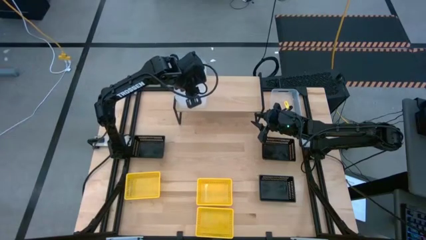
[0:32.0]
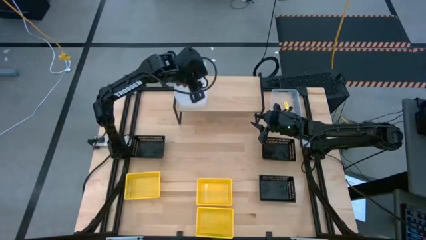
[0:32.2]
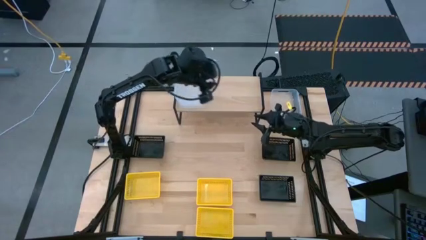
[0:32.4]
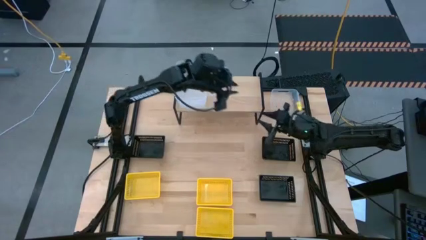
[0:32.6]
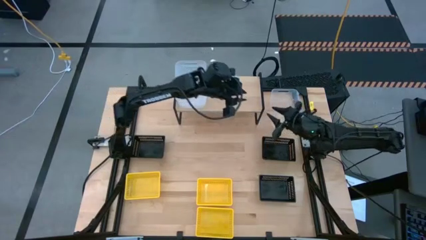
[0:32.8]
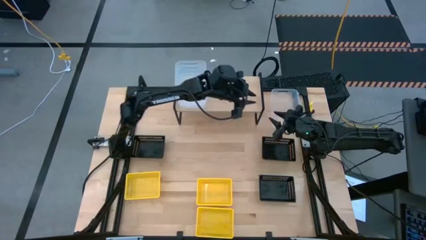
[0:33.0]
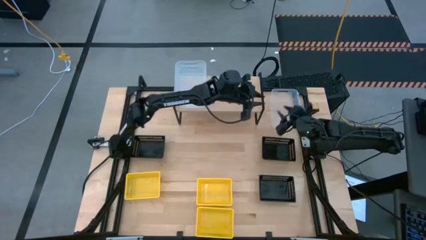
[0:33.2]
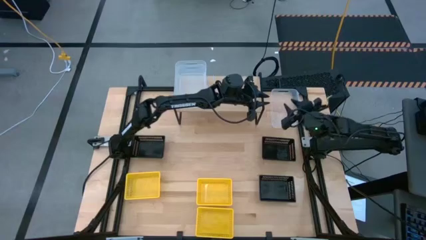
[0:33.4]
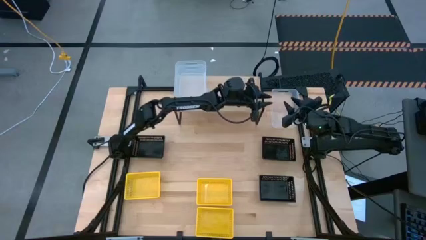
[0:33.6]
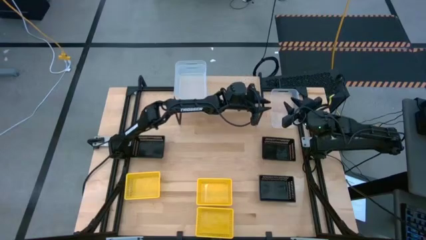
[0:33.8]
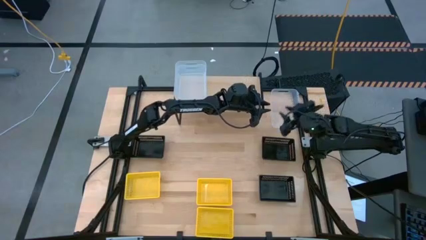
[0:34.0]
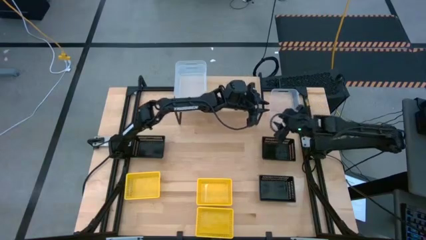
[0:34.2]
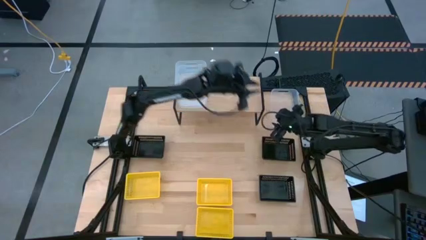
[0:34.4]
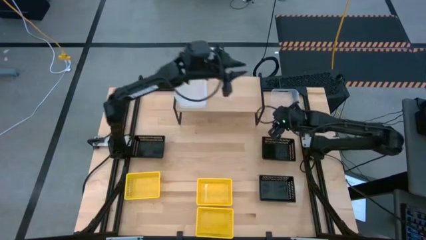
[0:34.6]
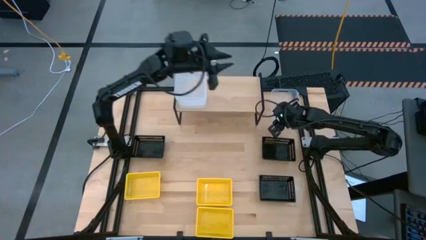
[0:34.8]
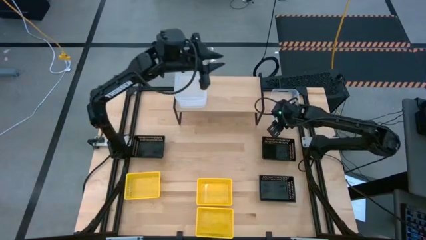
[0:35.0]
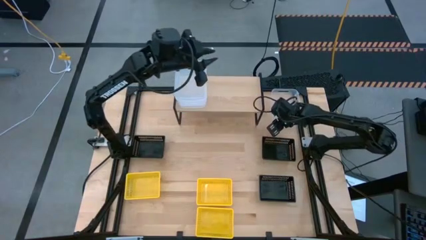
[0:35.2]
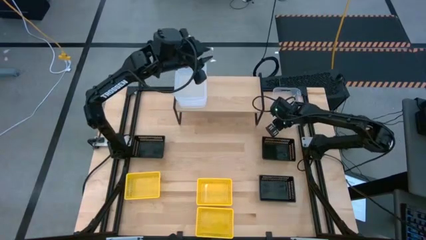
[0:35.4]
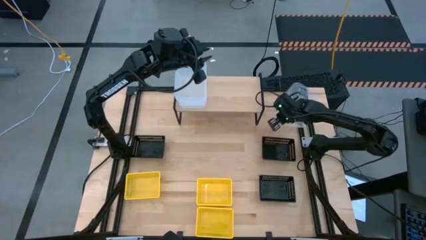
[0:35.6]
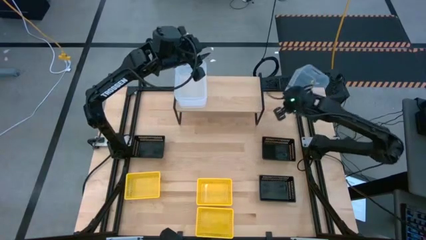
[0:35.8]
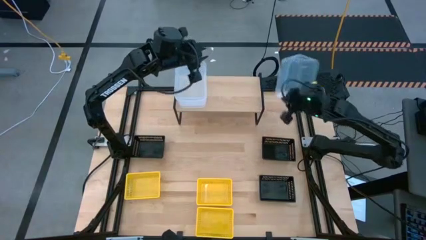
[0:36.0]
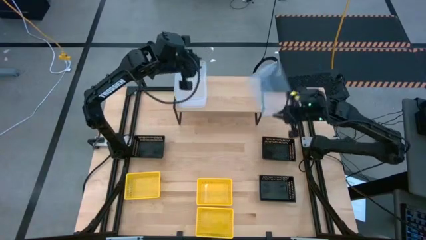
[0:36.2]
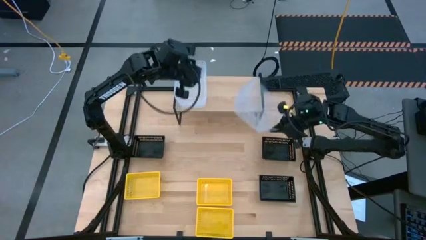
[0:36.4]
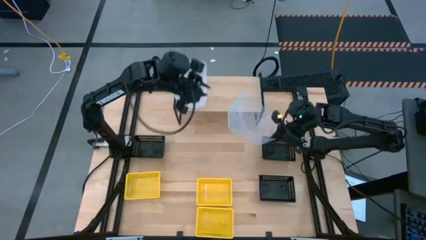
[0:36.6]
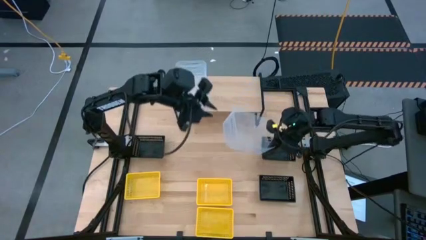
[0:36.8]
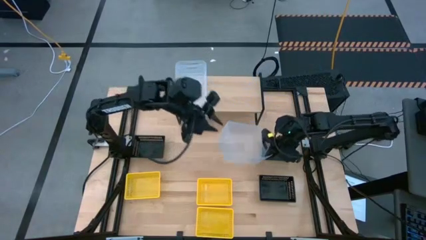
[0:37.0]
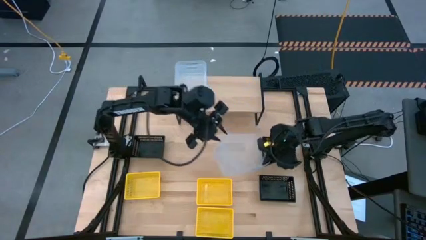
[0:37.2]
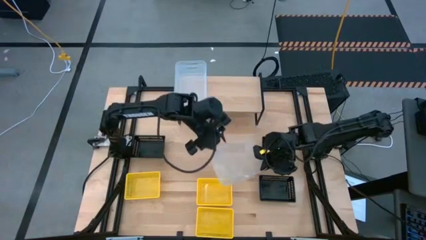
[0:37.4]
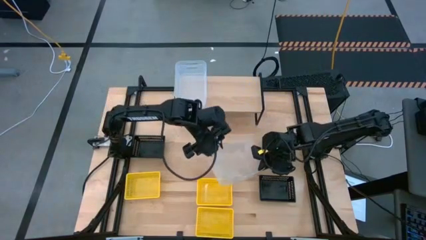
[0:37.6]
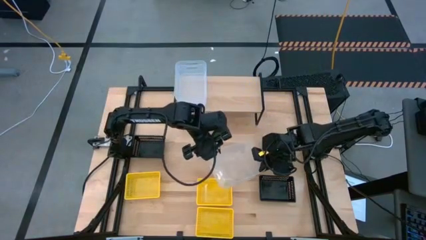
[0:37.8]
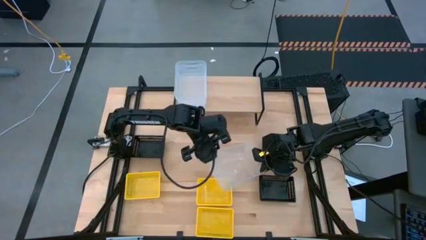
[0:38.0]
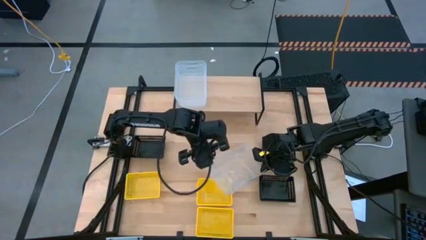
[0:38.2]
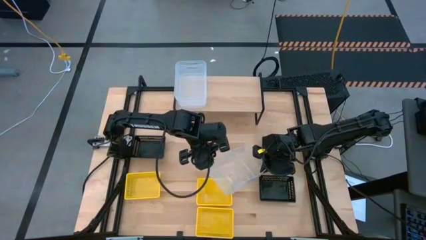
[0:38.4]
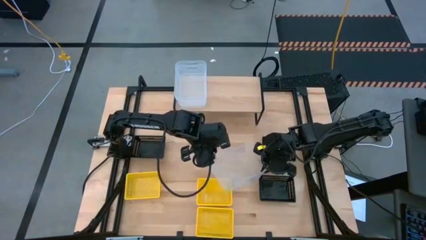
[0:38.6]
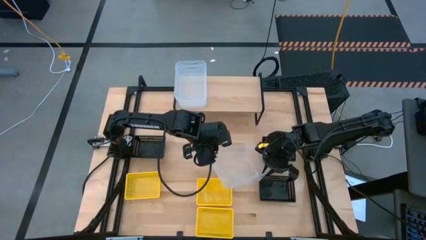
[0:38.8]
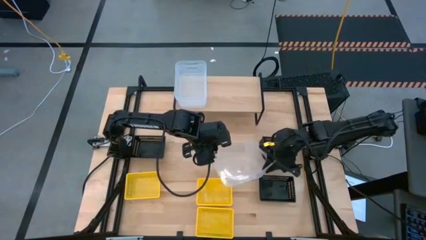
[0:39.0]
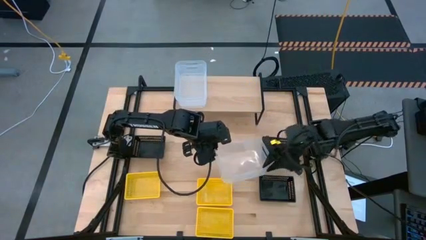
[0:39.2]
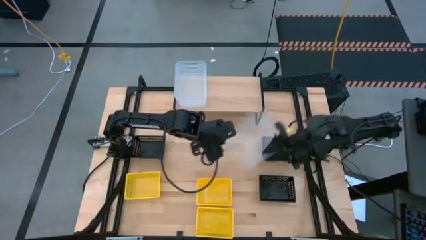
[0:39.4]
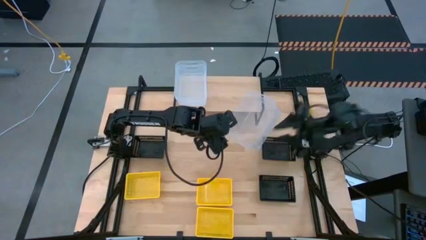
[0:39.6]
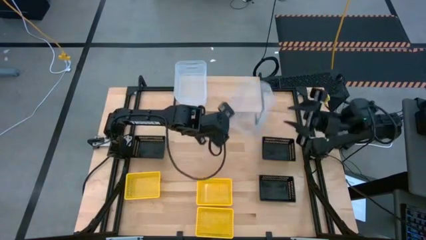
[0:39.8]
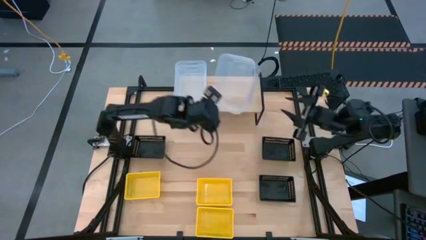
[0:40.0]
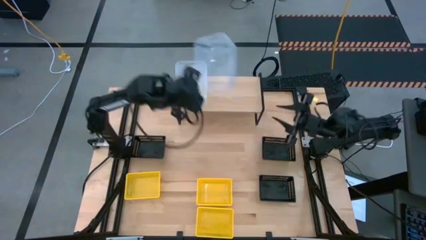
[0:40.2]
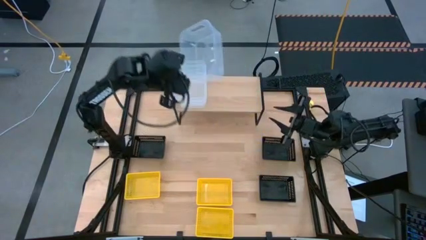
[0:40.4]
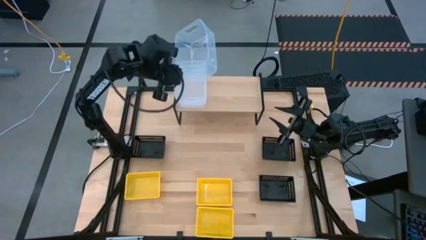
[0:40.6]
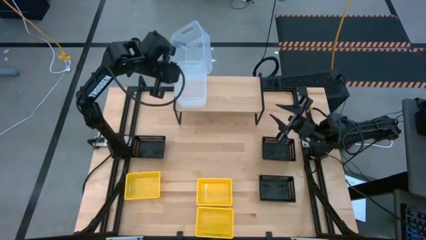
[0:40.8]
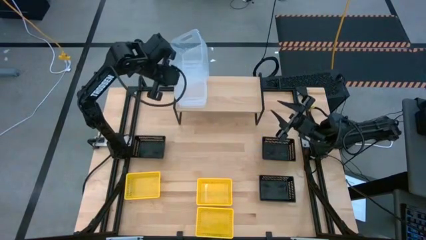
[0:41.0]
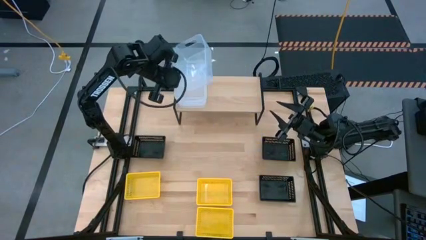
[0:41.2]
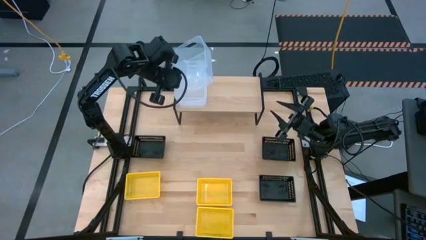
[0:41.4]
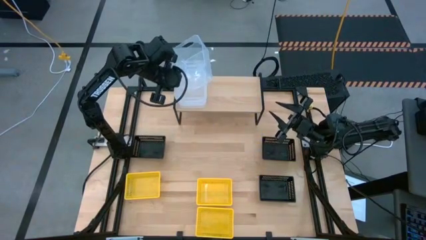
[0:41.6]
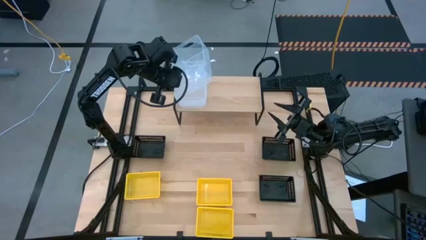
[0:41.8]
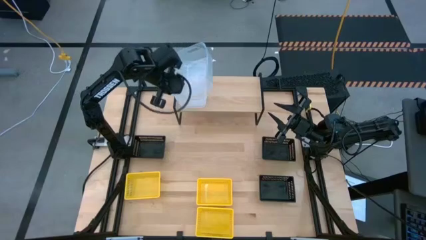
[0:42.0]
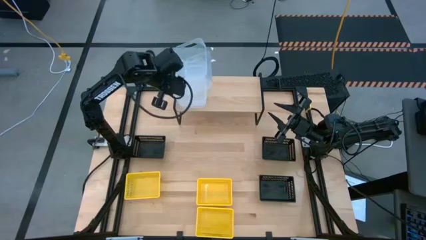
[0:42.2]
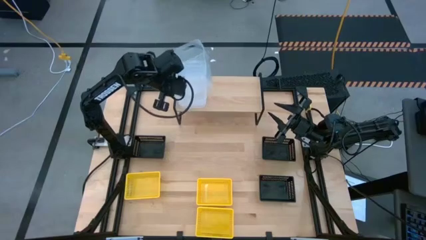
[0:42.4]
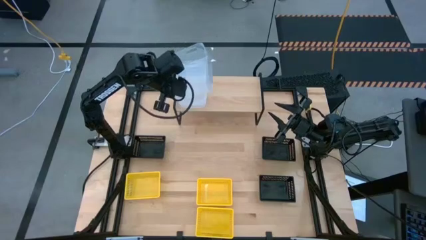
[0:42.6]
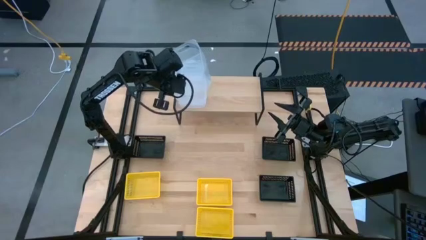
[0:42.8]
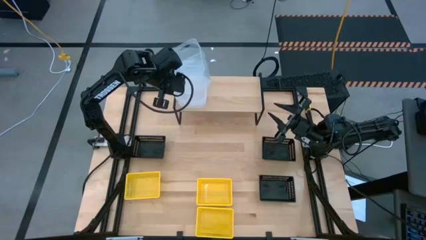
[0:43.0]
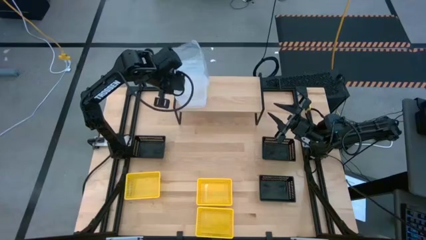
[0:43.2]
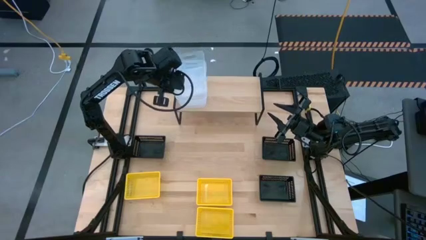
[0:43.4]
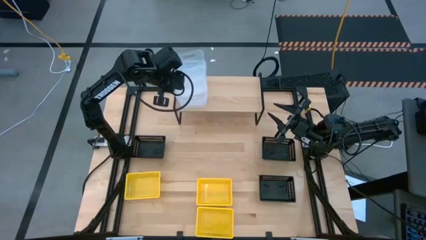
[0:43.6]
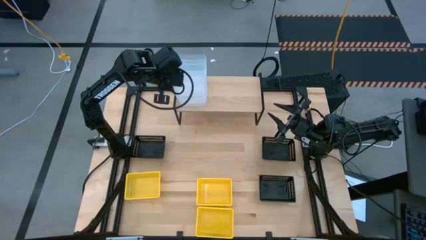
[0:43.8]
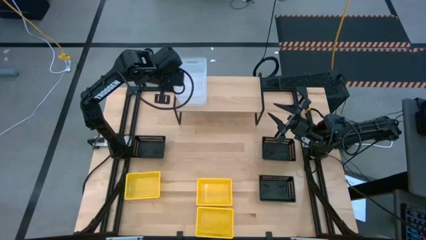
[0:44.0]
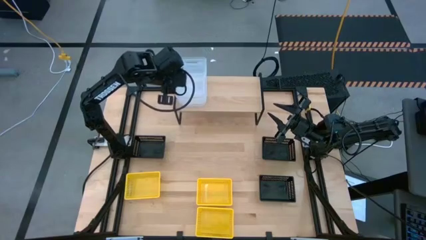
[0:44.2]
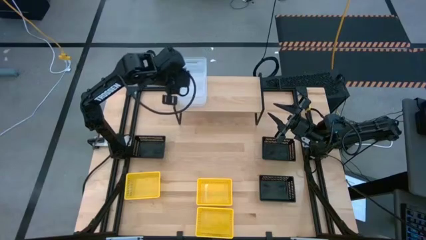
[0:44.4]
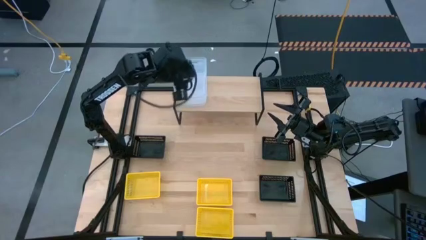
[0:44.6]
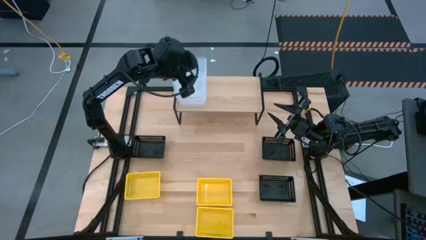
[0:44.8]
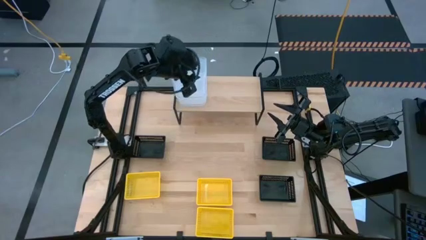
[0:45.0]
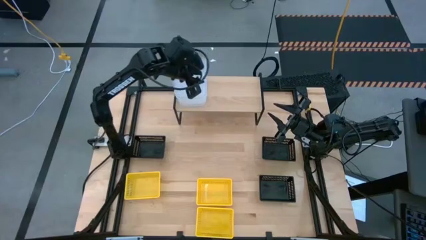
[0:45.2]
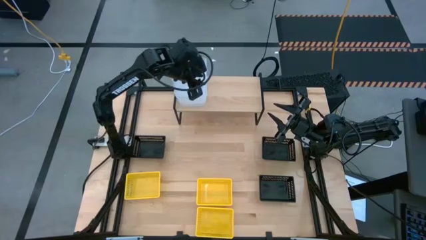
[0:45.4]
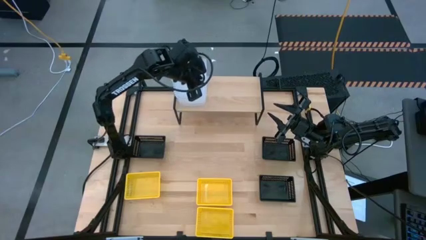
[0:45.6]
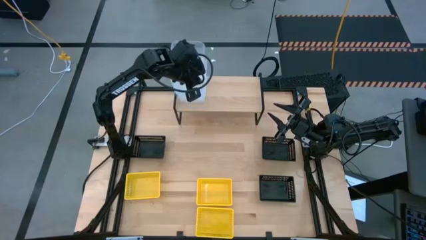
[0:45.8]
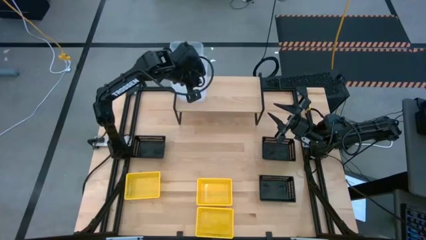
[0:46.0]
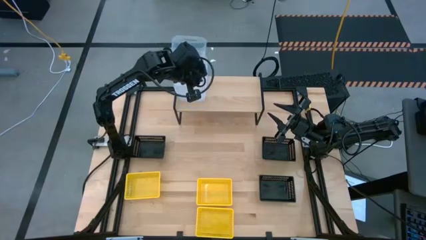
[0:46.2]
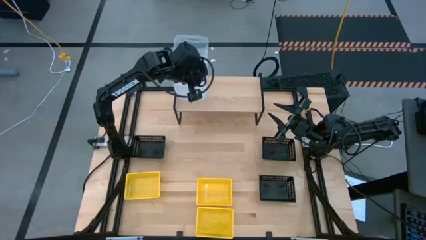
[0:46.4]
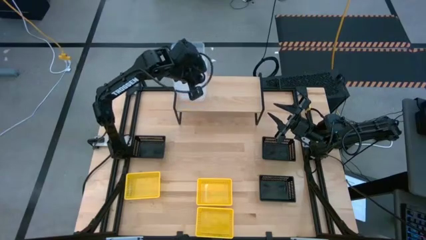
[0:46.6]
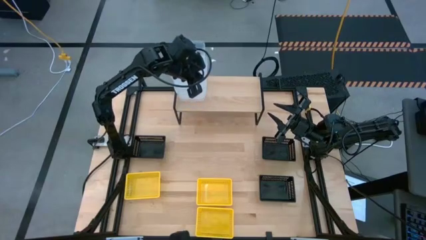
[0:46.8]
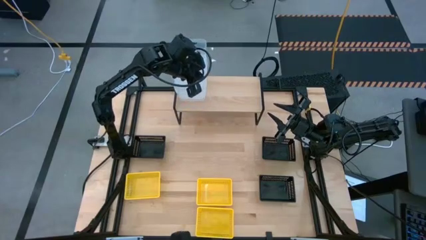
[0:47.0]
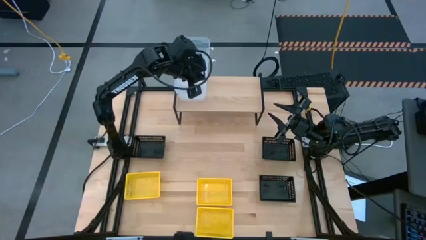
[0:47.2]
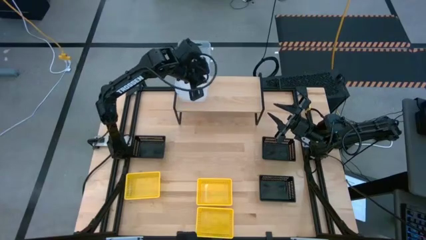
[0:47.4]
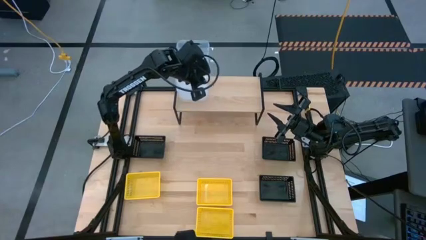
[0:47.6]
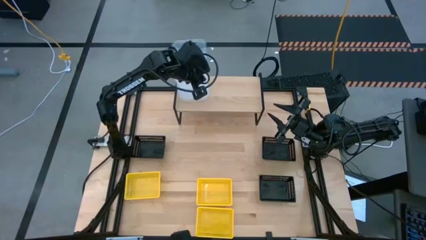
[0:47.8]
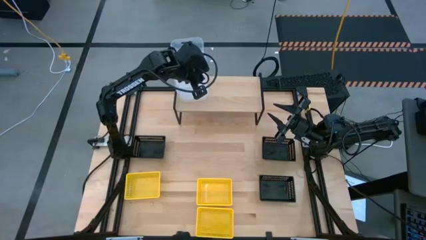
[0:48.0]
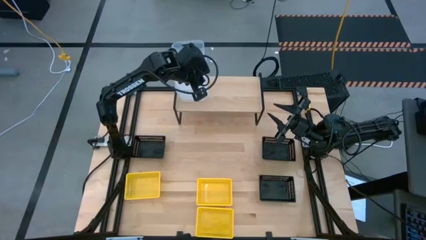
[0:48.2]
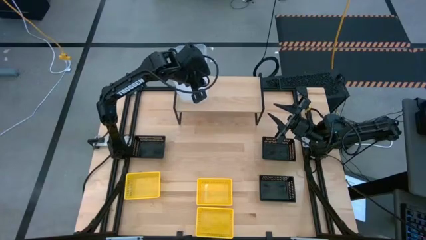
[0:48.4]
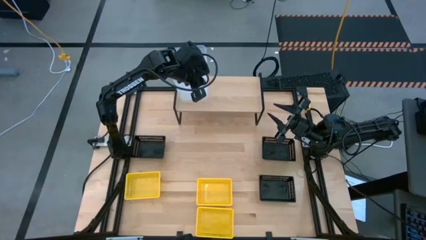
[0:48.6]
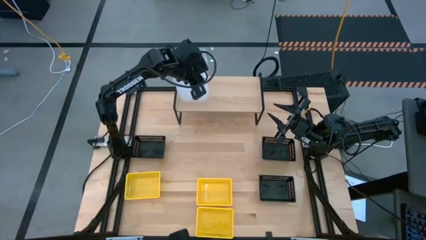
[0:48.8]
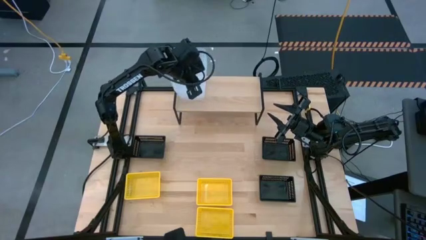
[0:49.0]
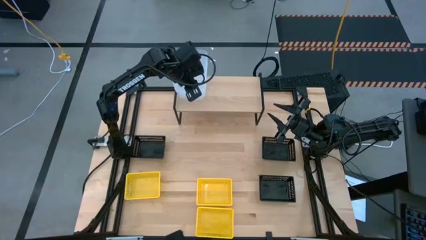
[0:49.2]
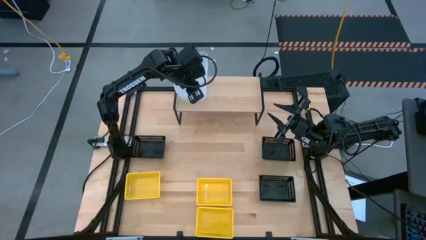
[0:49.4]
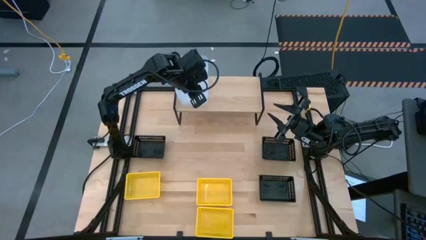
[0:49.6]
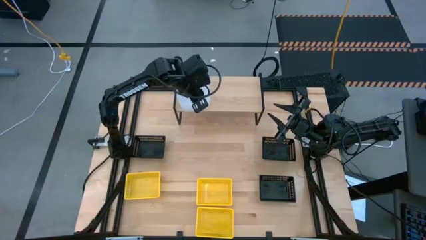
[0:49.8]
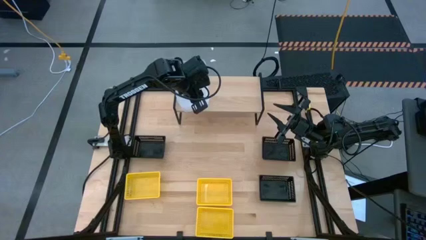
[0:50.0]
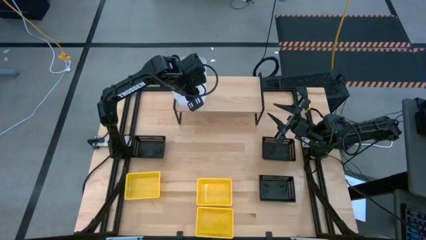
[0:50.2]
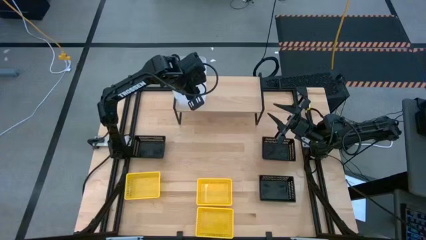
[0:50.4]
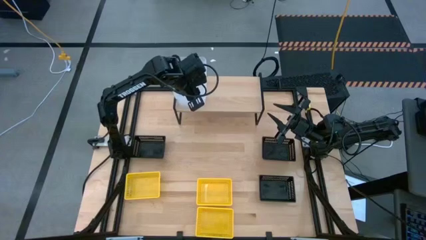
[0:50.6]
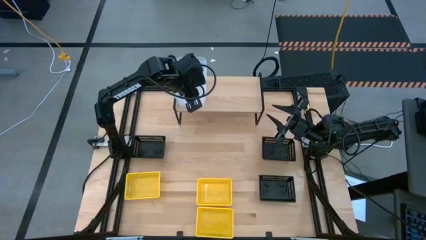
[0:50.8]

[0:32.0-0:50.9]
Task: Stack baskets on shelf by color
Stack the transparent bin on top of the transparent bin on the shelf
